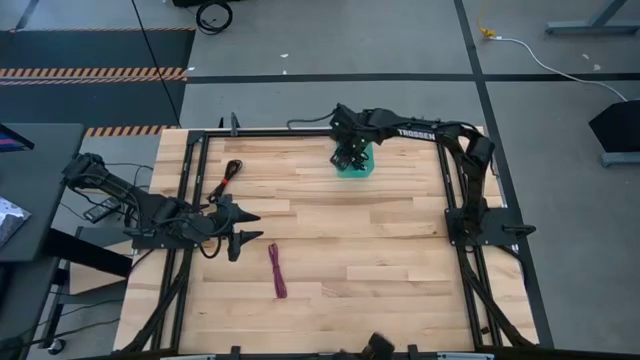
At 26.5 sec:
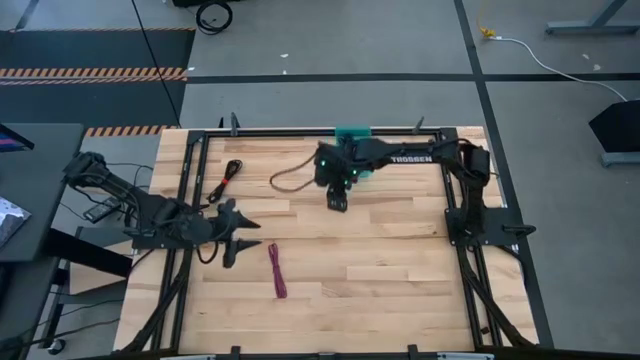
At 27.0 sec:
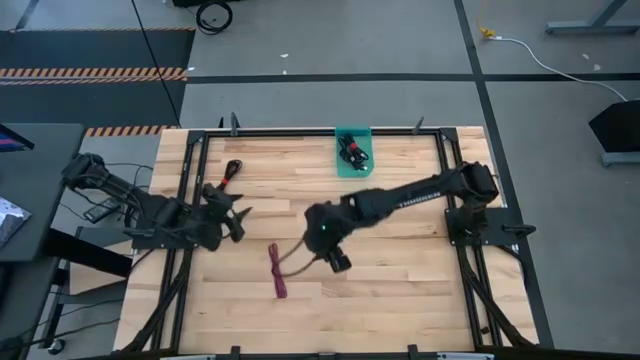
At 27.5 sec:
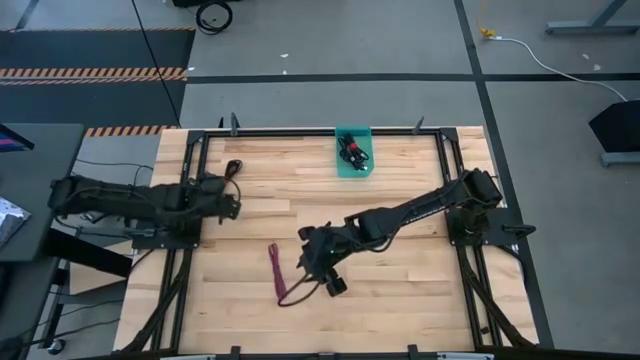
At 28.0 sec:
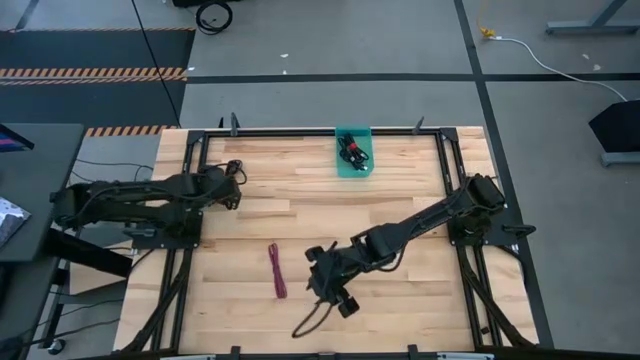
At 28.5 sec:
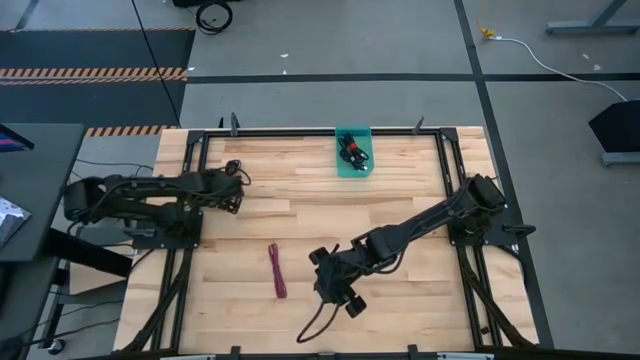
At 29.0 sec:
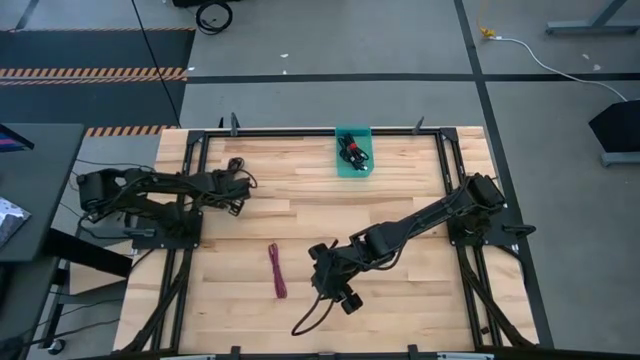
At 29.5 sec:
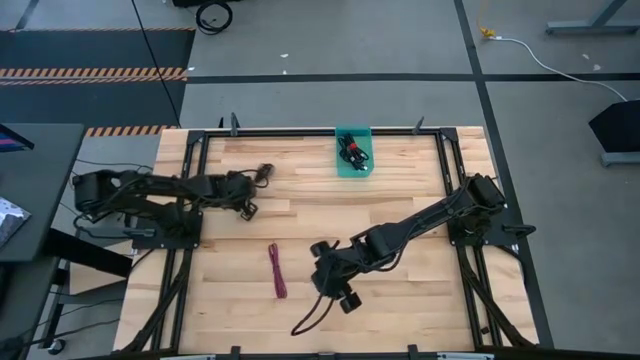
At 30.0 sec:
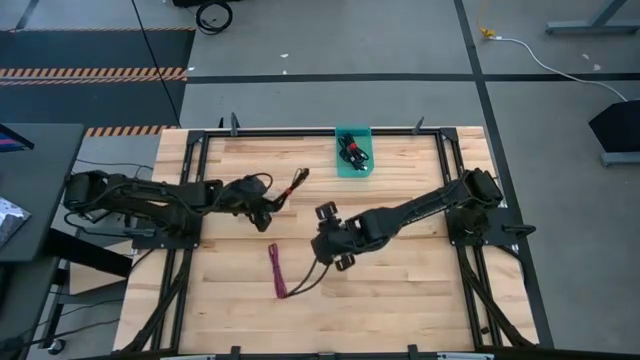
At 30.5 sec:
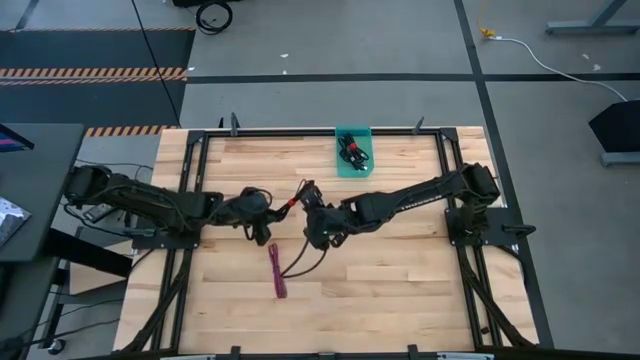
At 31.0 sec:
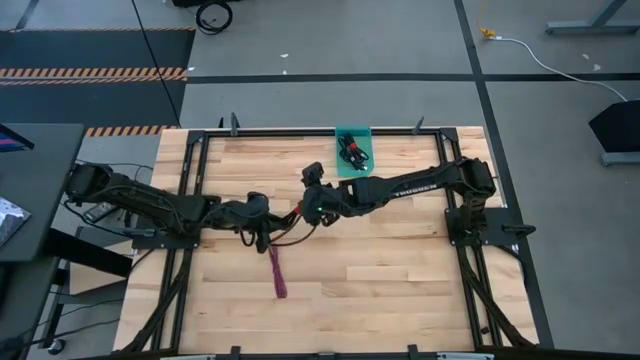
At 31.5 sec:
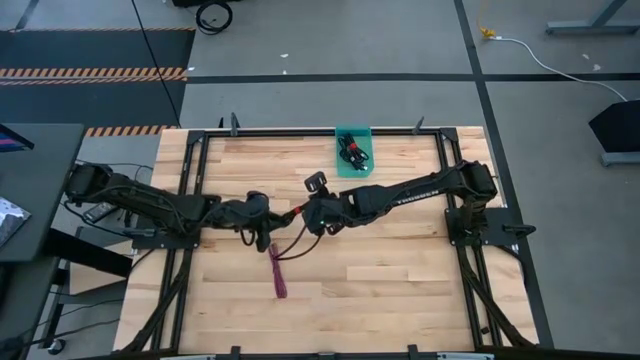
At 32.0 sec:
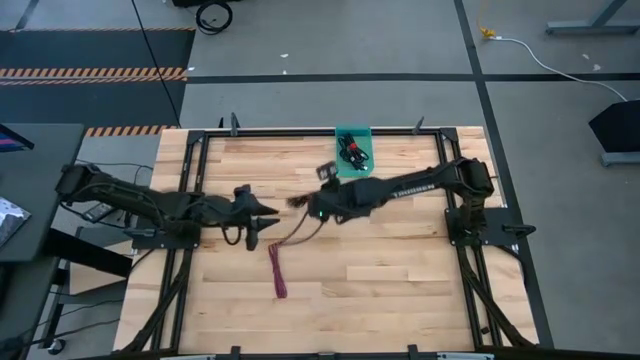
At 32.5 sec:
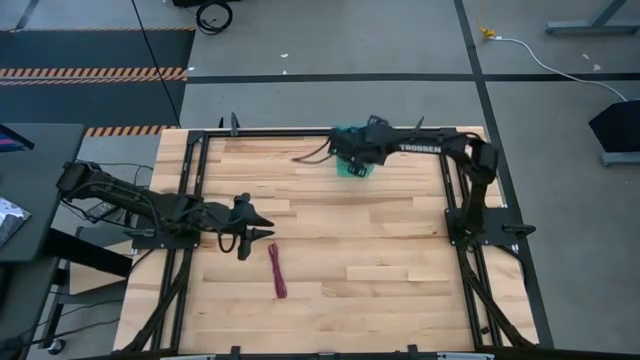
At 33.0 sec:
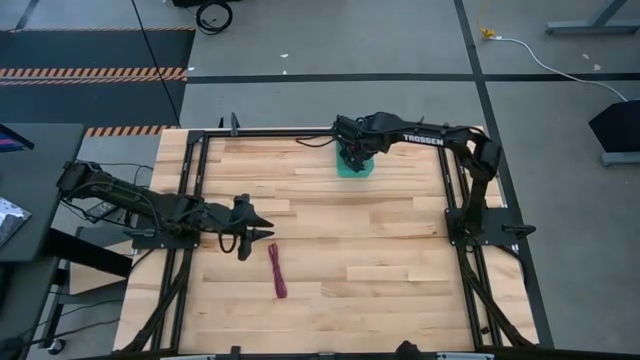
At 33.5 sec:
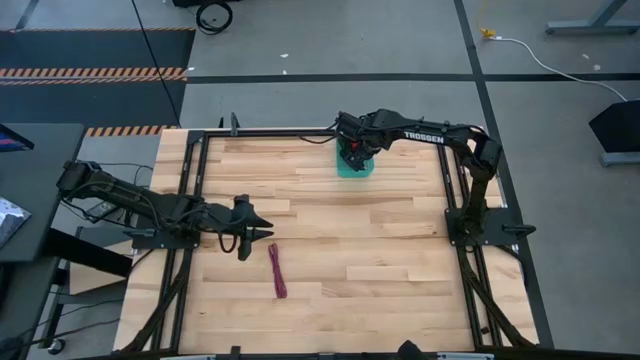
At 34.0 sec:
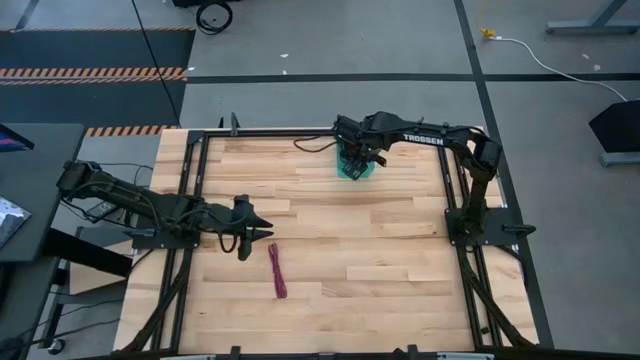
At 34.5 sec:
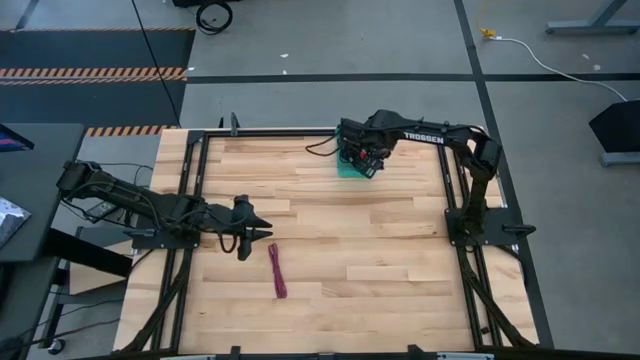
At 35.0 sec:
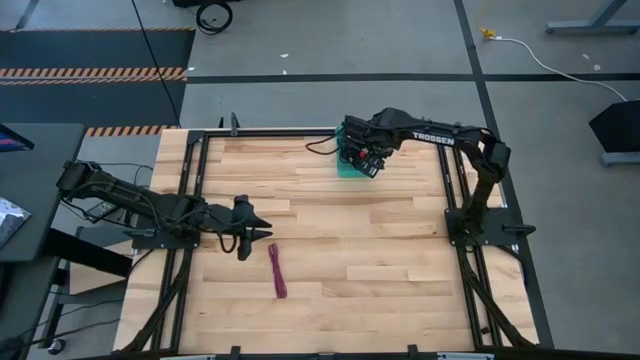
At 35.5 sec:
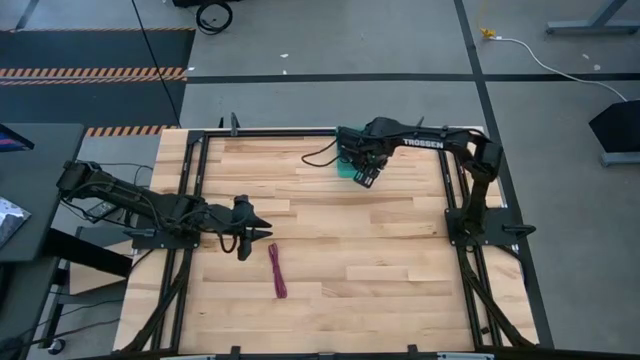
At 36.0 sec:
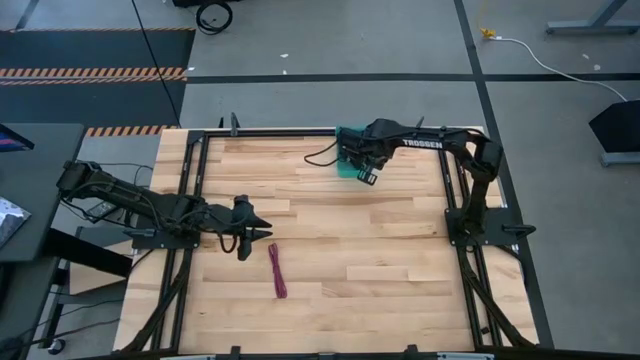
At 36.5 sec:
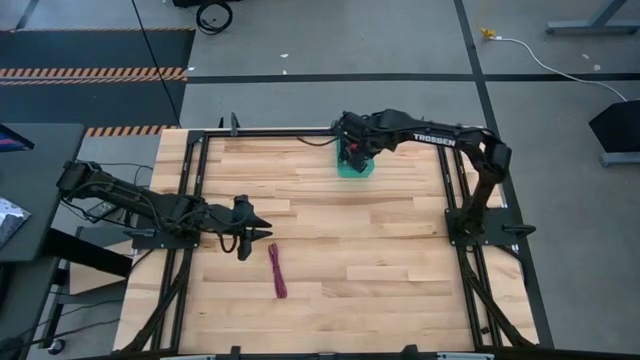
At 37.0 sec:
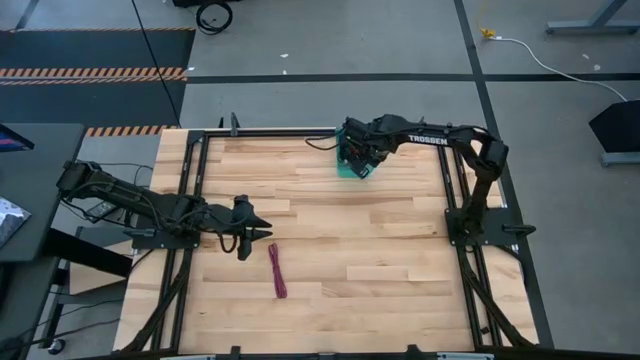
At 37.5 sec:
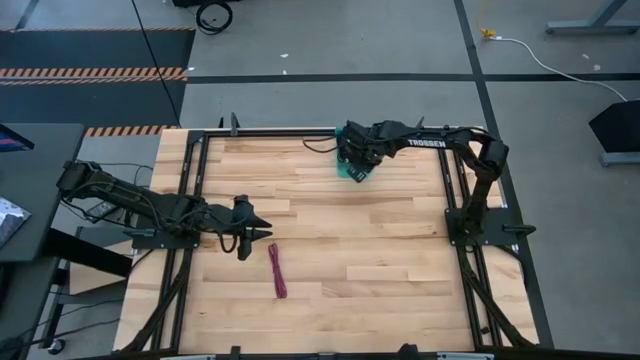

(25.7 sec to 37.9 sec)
Task: Pick and place USB-C Cables
Put the black charger cable into the green bin

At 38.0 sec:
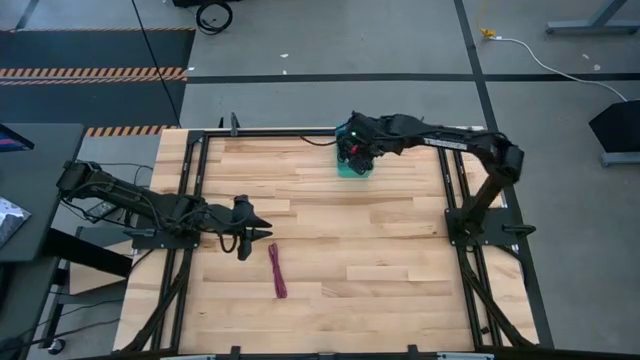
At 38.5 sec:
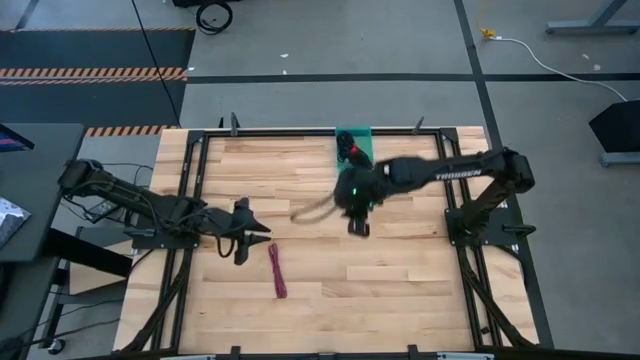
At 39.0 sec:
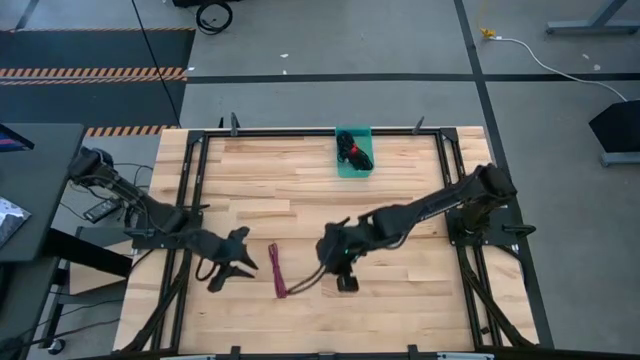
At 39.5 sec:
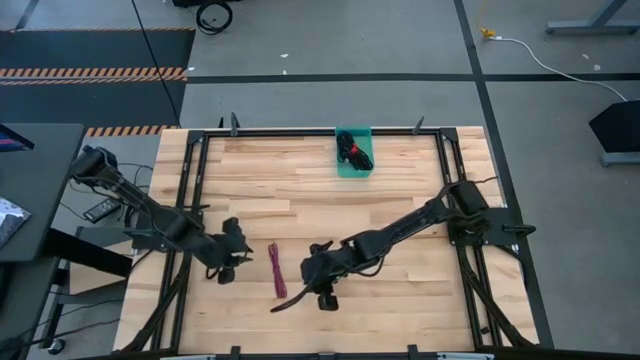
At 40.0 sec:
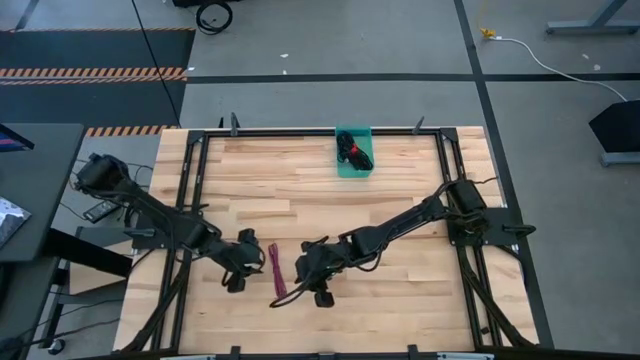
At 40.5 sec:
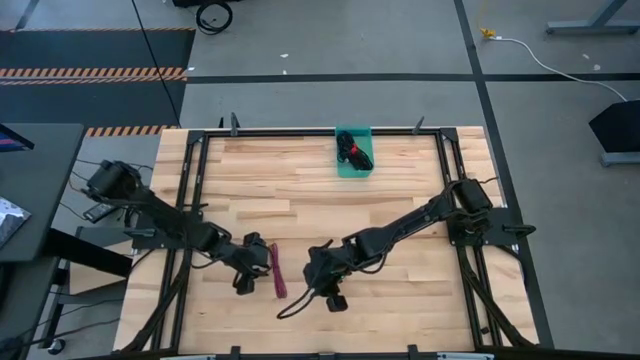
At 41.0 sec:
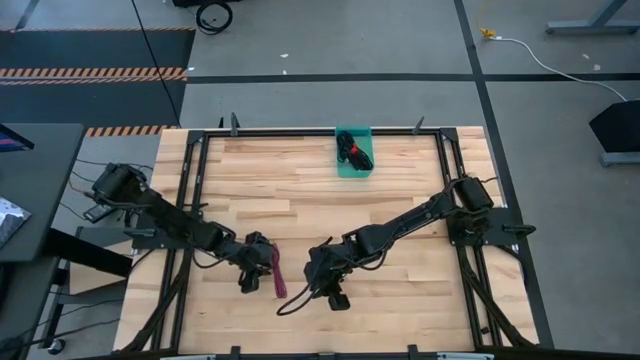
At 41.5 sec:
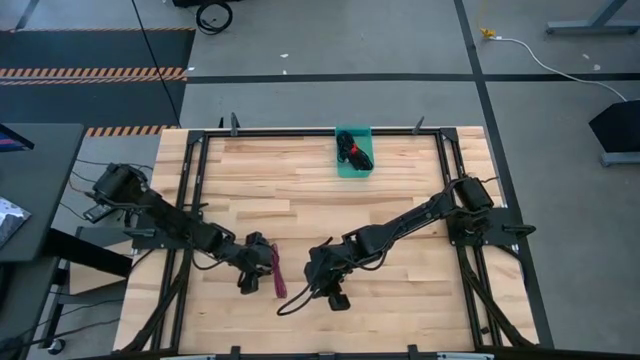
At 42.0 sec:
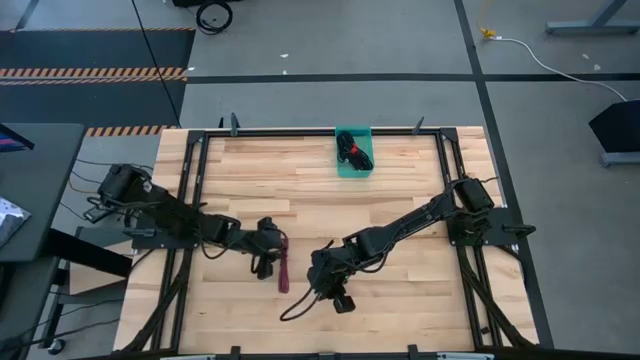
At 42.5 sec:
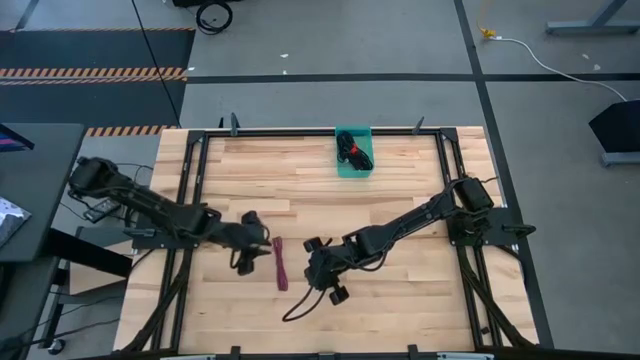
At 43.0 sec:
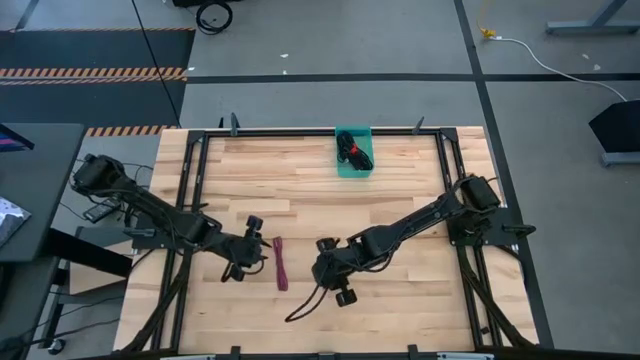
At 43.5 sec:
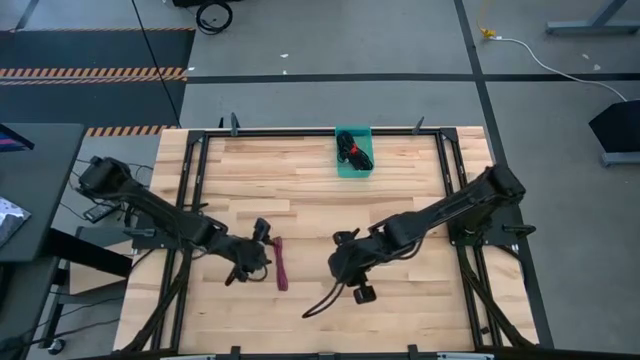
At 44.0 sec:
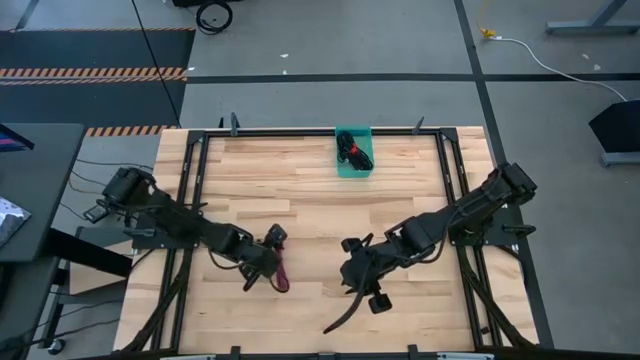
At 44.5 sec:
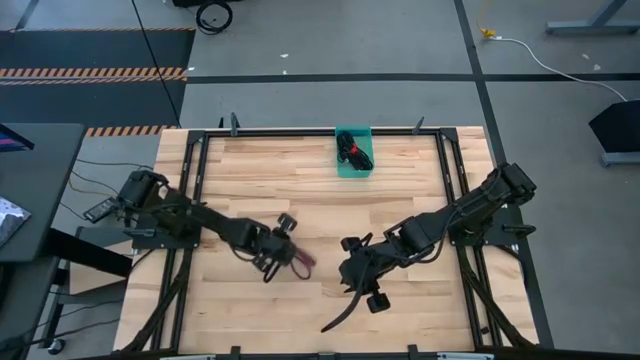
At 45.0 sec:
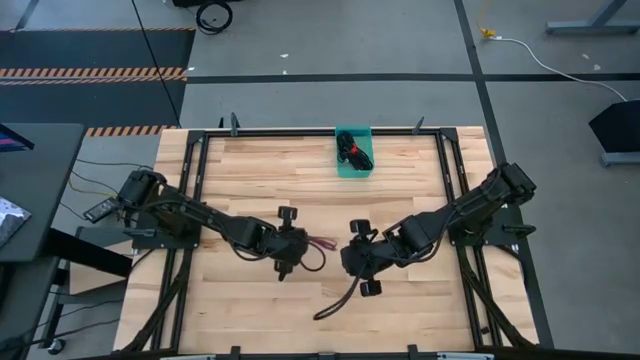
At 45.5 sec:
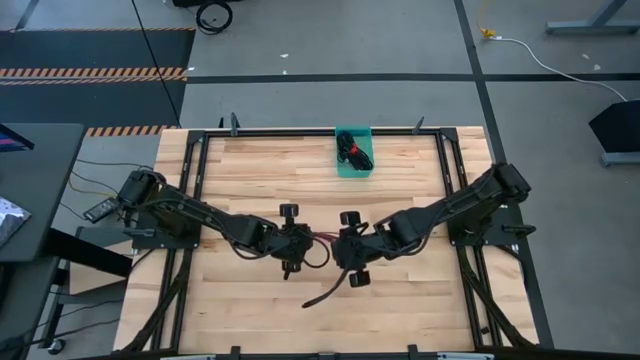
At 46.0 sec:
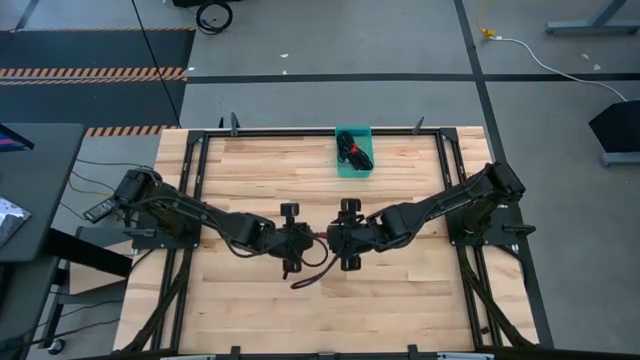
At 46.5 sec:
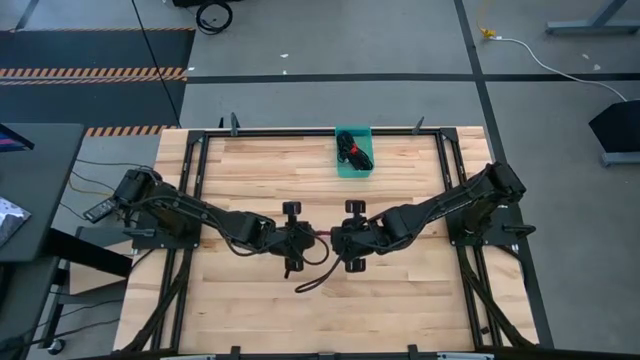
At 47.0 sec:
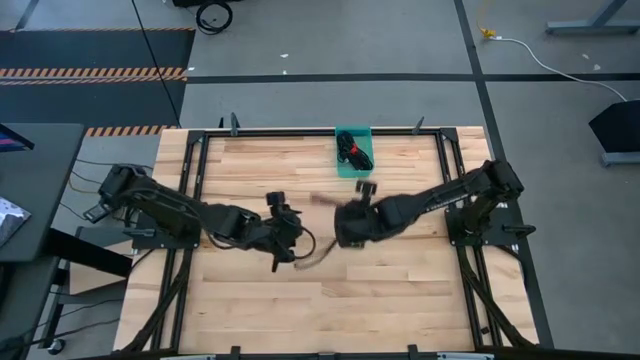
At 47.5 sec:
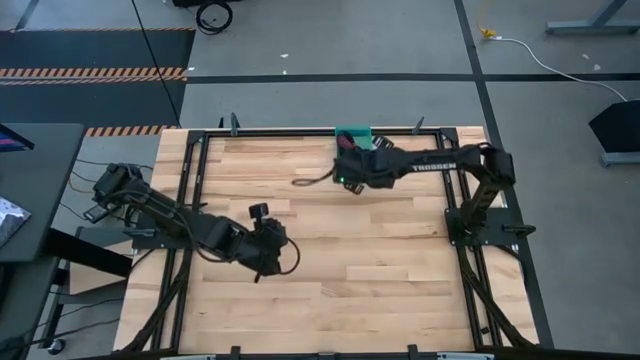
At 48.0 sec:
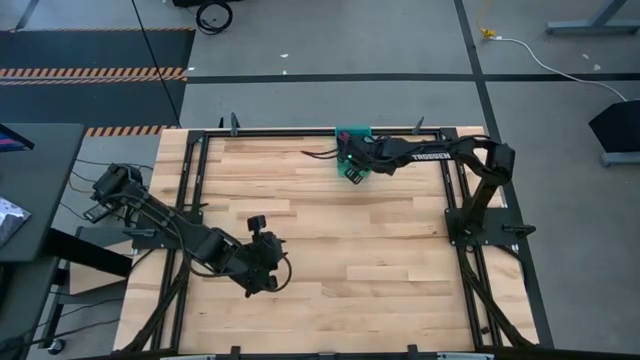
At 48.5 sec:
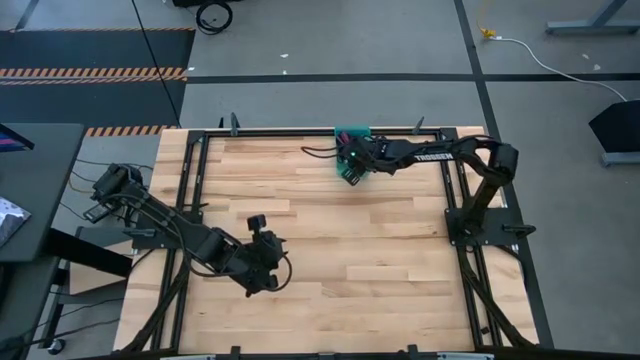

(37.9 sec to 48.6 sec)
Put the pink charger cable into the green bin
